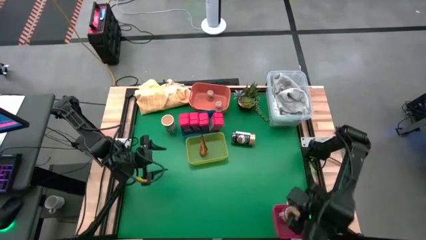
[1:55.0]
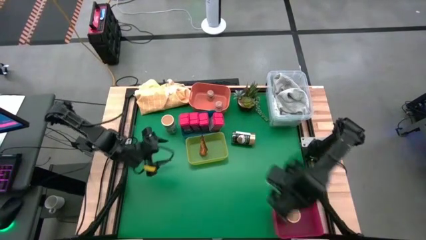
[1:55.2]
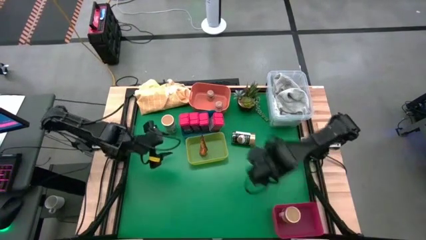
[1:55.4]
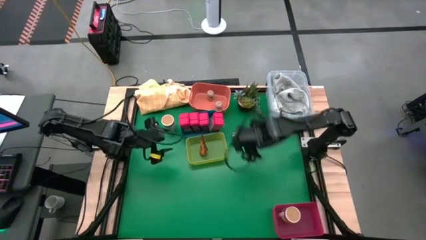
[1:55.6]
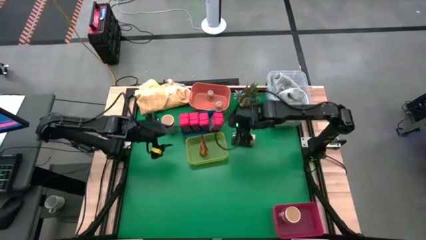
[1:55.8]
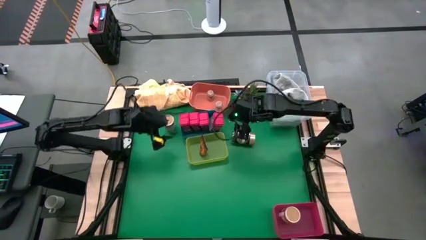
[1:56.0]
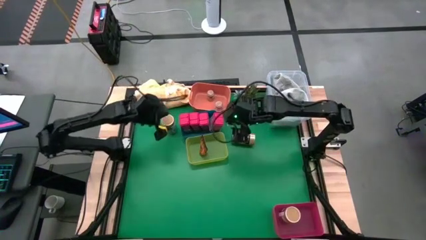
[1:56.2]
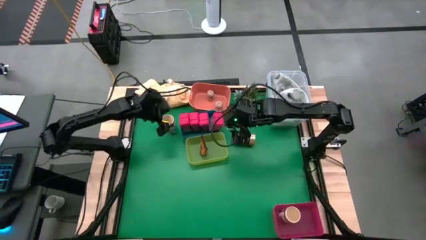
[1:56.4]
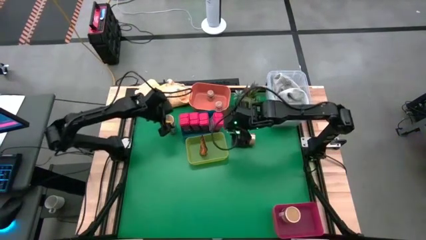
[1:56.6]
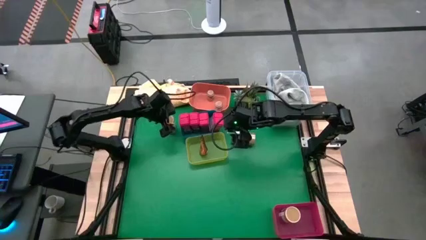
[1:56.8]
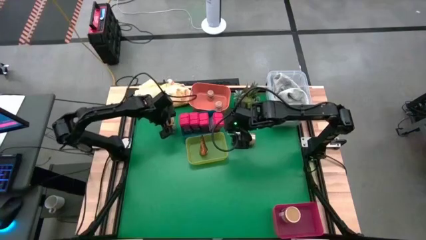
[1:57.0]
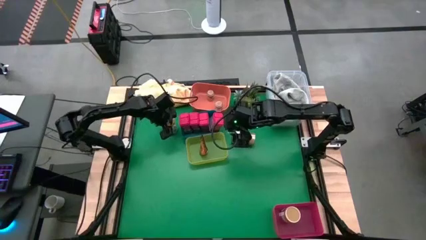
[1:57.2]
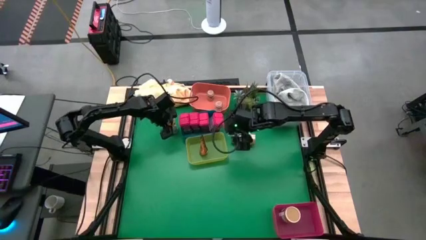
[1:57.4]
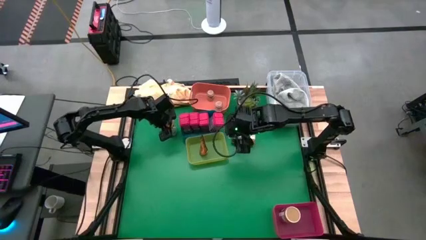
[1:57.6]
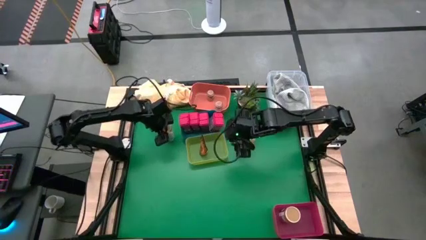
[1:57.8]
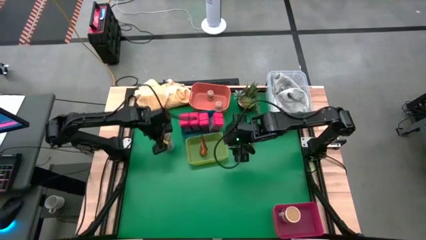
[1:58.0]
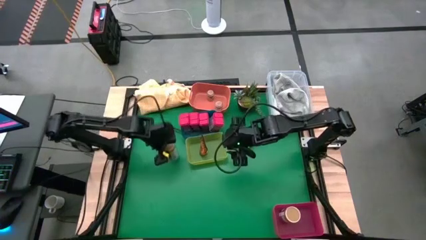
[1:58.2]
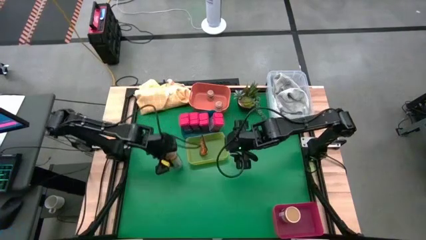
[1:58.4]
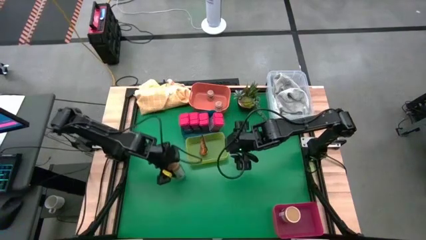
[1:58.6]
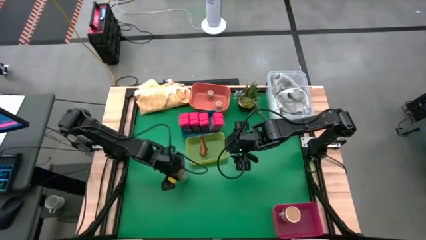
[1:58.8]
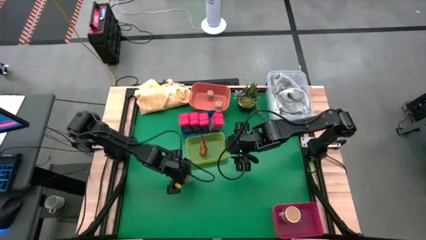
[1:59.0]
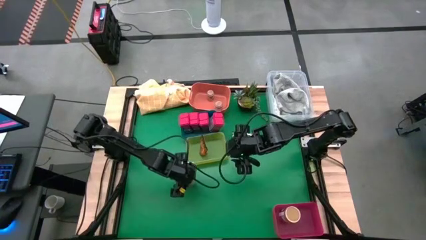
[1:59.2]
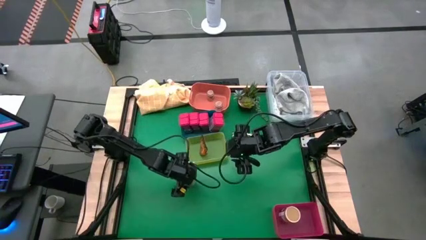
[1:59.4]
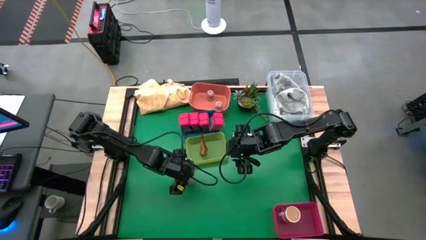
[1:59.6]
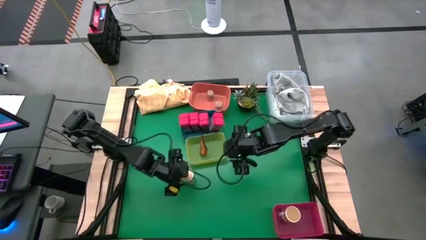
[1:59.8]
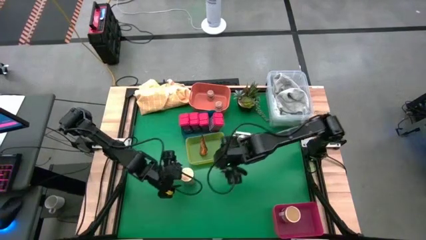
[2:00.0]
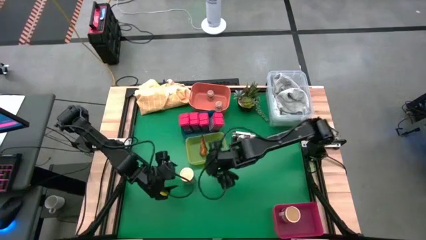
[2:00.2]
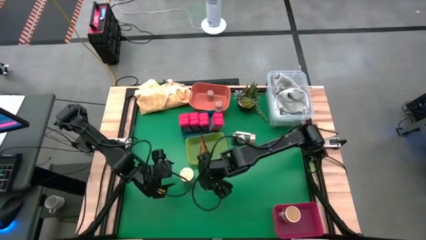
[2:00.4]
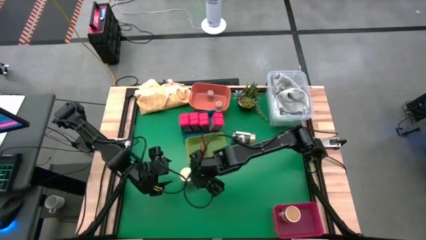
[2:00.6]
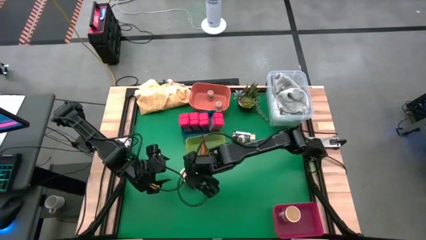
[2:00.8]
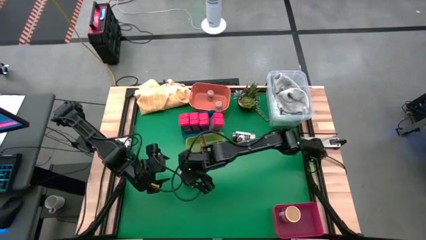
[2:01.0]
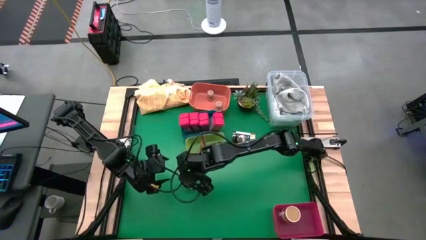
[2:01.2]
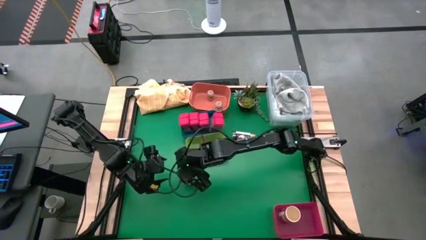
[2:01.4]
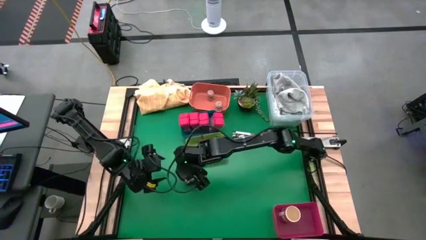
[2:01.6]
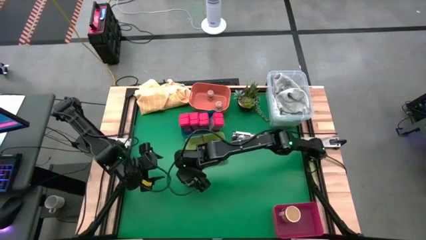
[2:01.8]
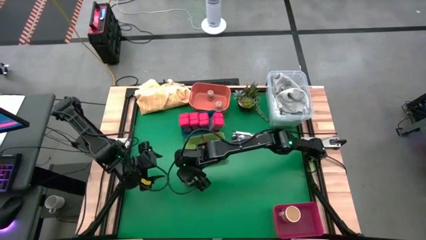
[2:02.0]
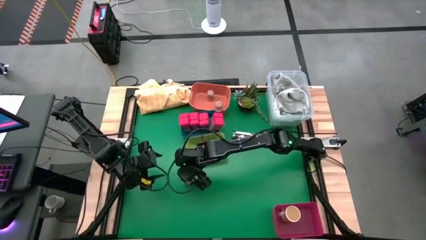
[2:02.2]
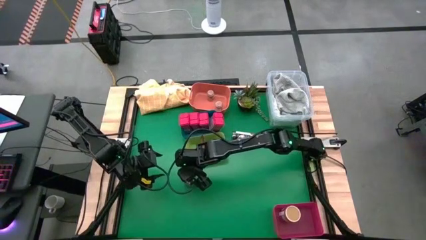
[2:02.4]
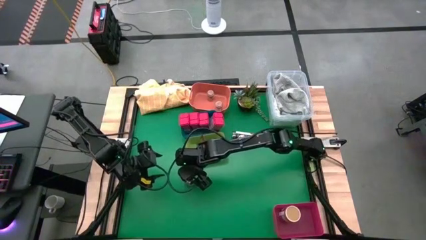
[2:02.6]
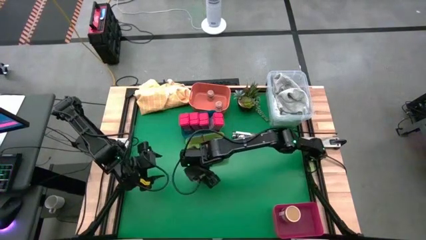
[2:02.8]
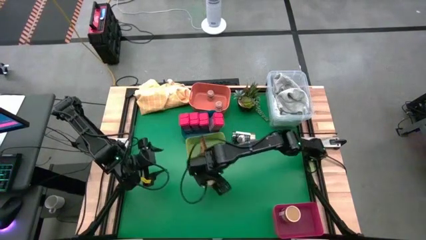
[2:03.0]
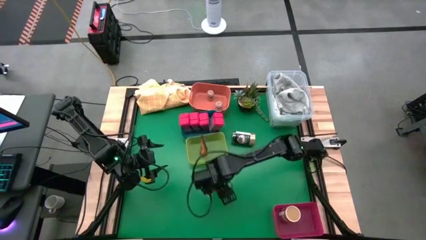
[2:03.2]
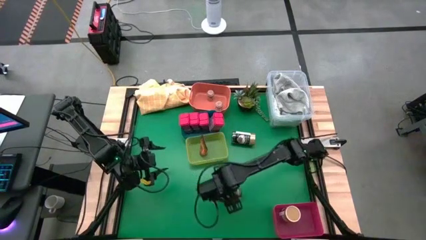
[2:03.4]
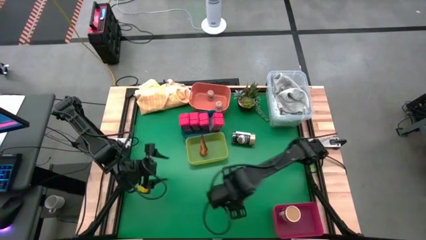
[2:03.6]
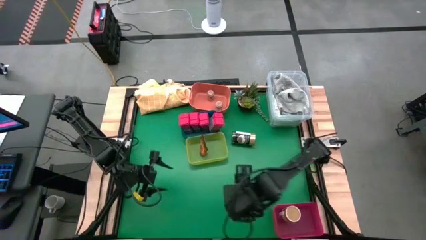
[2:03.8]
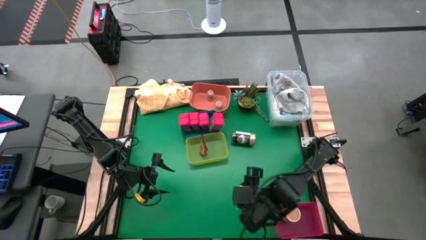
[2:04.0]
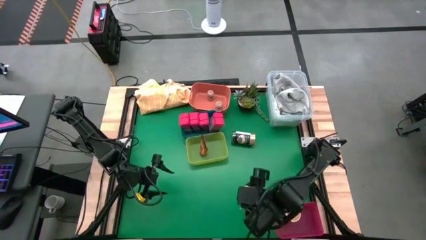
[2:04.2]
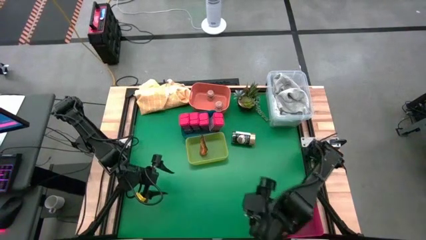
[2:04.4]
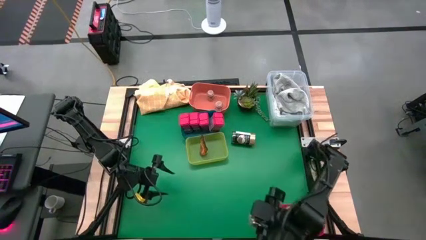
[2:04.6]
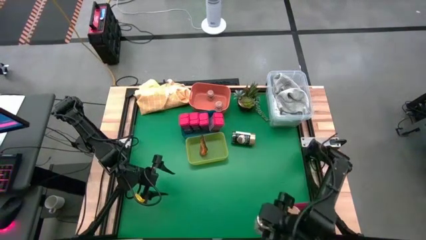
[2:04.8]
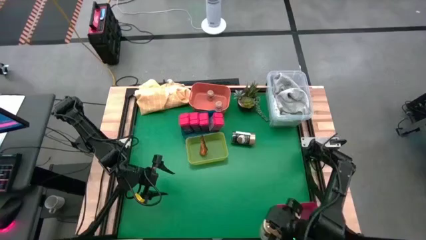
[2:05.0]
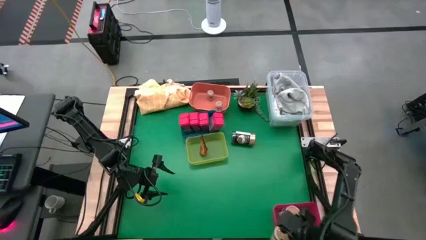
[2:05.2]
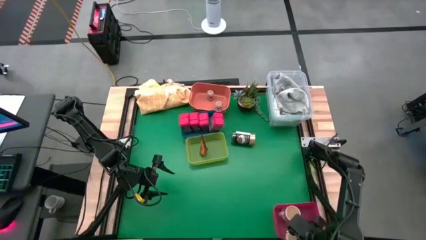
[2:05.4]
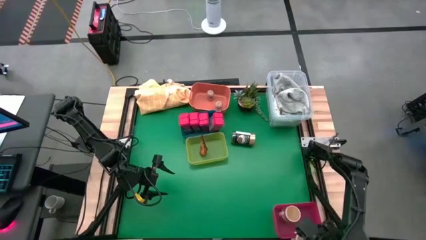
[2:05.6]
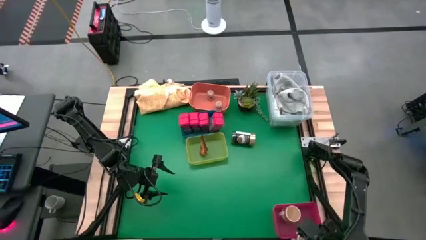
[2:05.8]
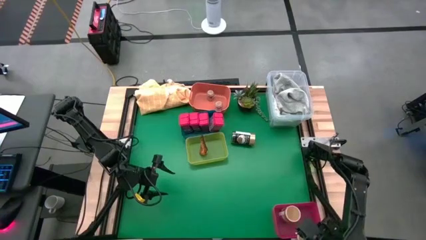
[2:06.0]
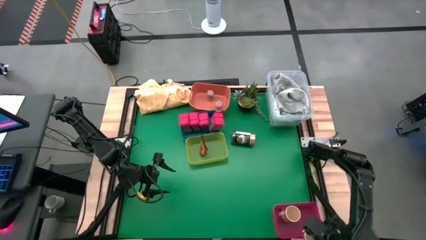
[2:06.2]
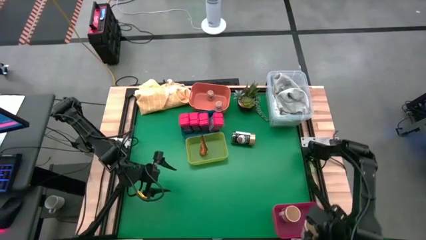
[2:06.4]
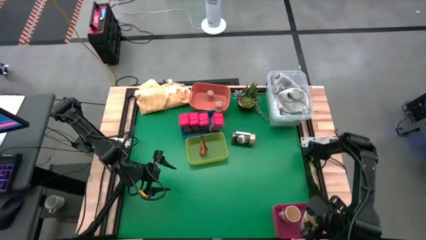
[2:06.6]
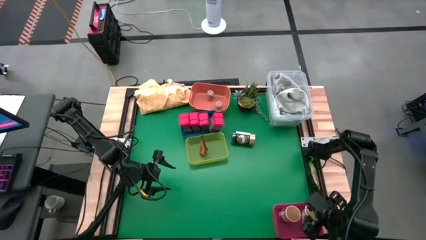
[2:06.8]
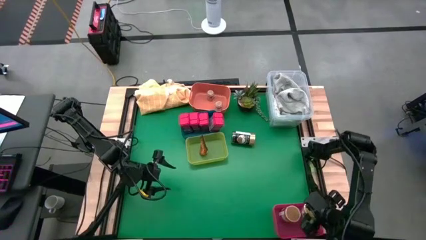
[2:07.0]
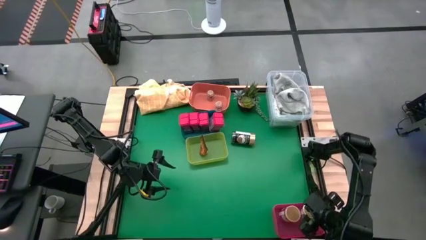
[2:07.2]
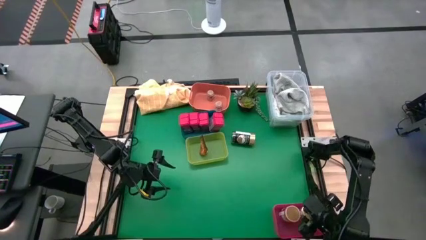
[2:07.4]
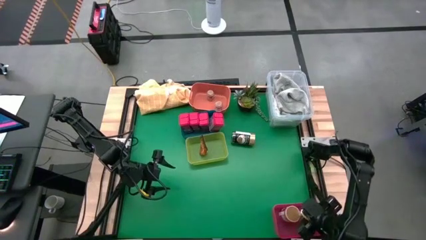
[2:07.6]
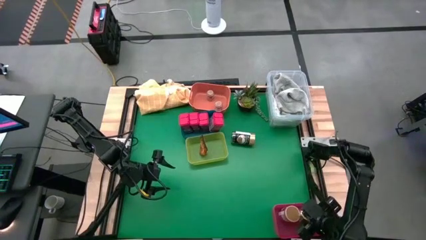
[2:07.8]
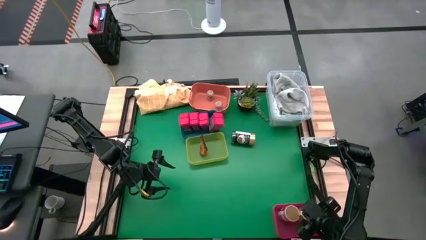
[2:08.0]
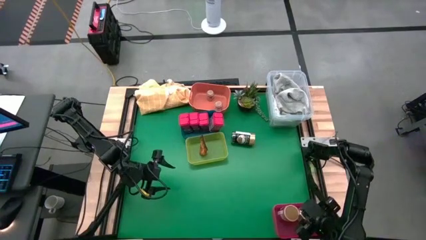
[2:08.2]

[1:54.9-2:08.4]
Task: Sort spices by type
Put the gold seasoning can into the pink bin

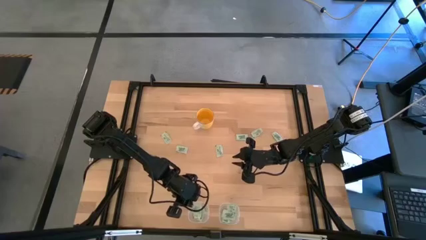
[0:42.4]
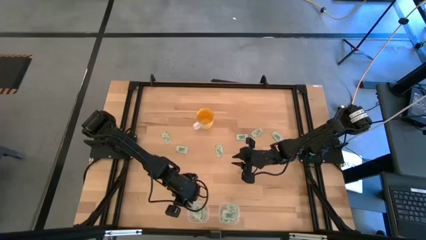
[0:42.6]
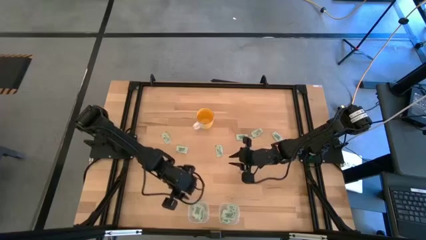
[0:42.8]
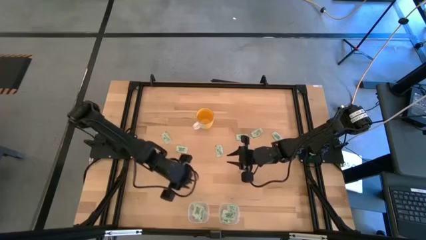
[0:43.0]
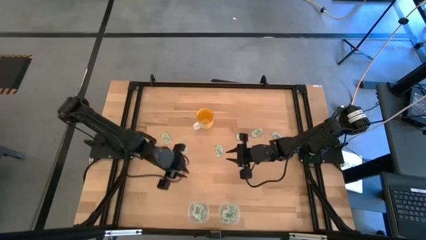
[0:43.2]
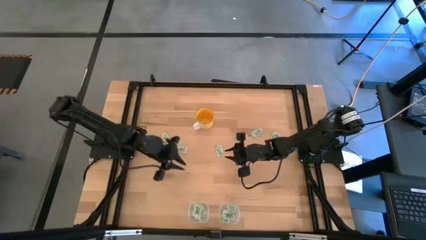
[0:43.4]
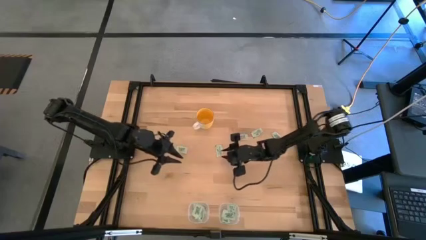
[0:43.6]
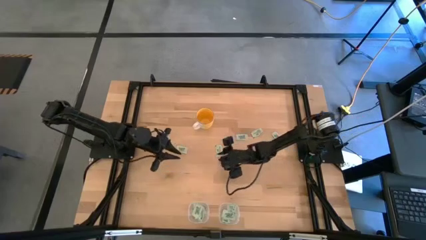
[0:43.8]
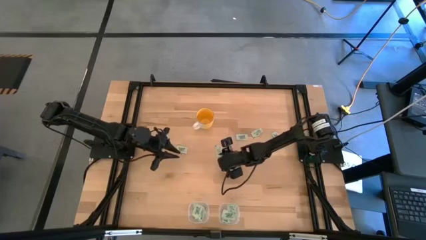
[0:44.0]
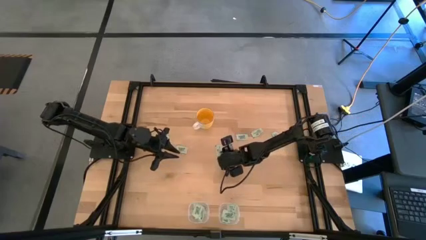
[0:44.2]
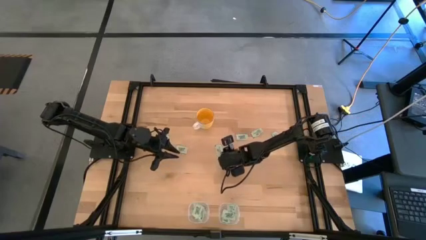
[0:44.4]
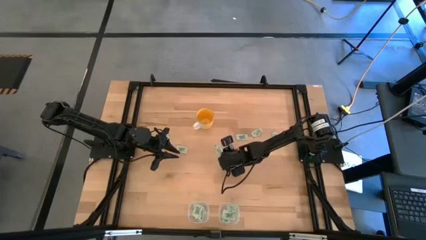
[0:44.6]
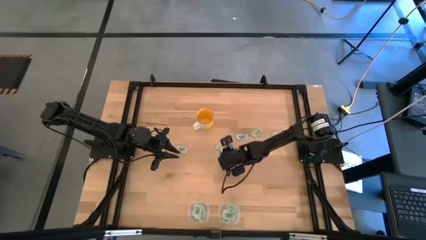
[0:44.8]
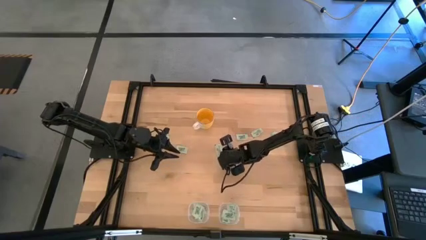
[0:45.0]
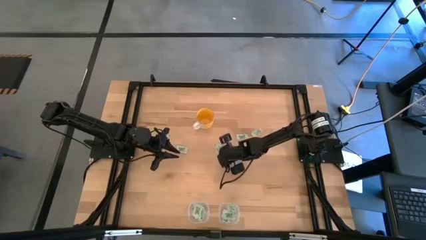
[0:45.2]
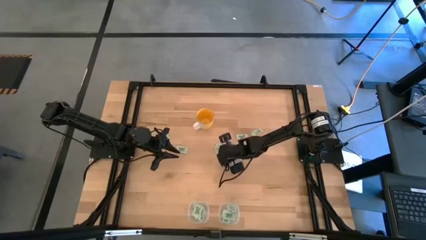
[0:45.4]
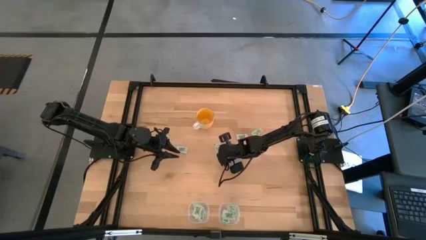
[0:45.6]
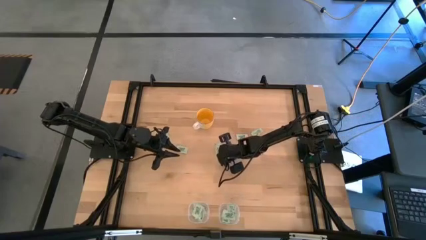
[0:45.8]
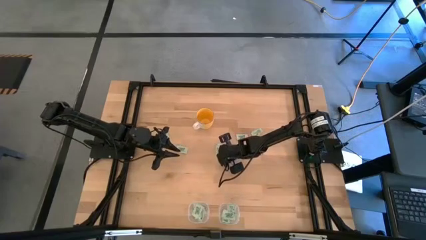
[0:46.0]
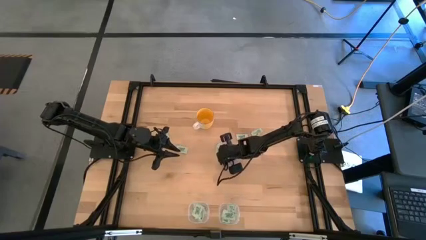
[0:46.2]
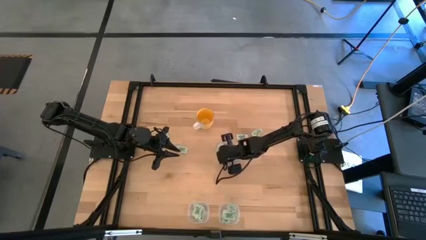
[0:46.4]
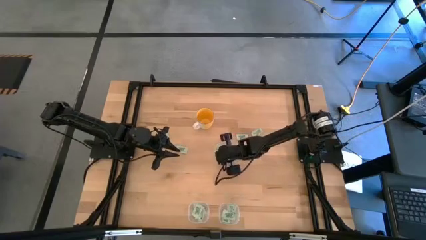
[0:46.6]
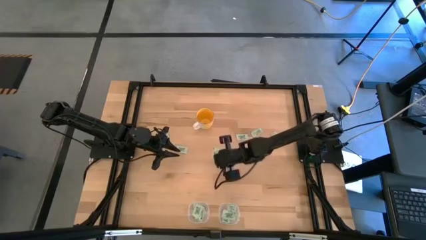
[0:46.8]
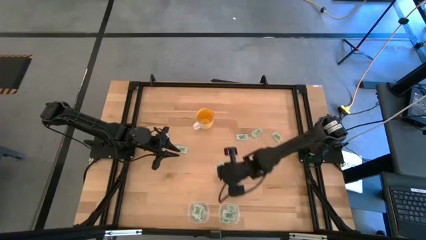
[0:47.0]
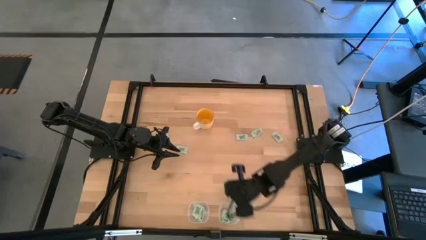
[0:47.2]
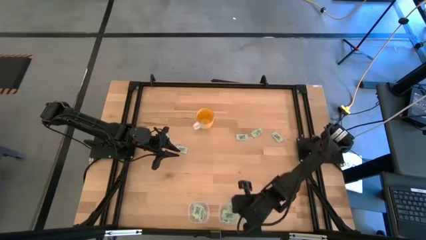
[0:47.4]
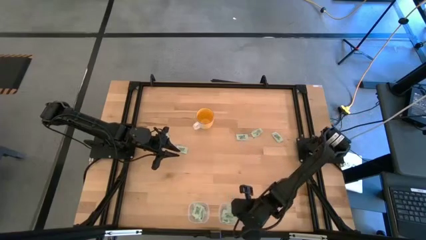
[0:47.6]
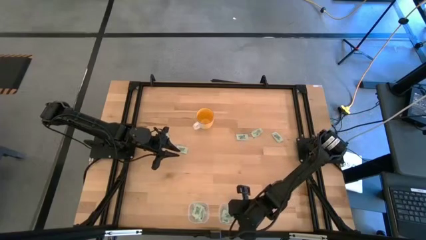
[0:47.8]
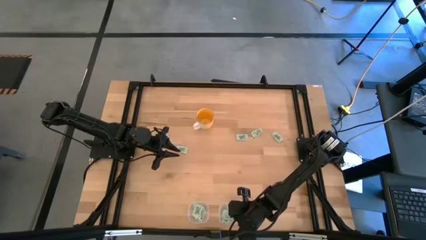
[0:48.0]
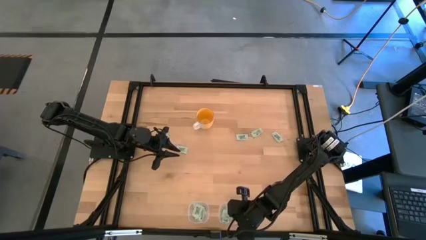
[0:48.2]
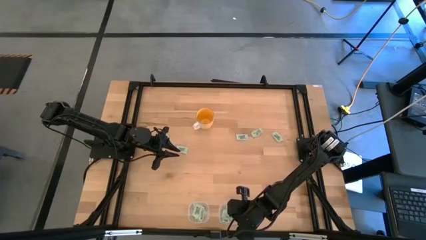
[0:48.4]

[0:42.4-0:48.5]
Task: Pick and place items into bin
Put the green stevia packet into the right transparent bin
